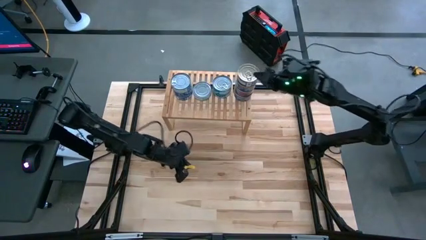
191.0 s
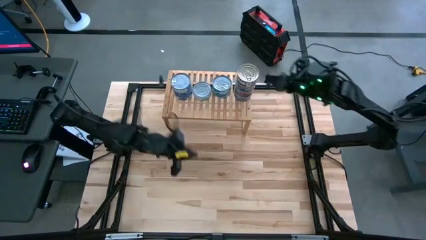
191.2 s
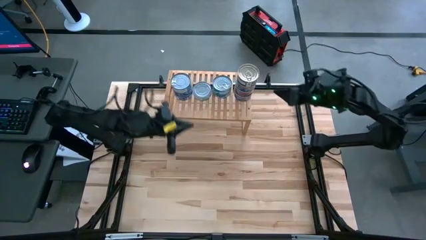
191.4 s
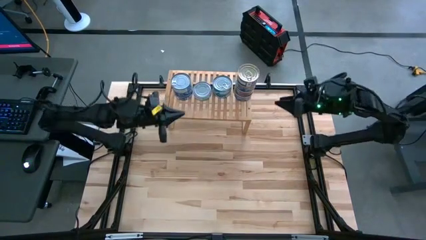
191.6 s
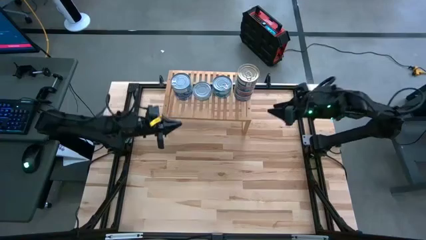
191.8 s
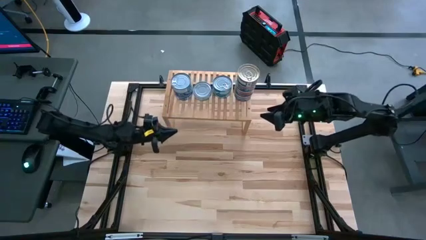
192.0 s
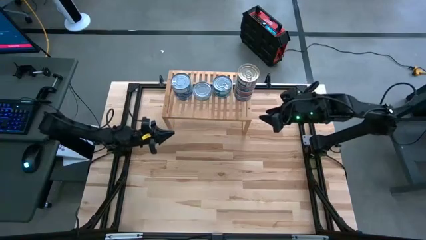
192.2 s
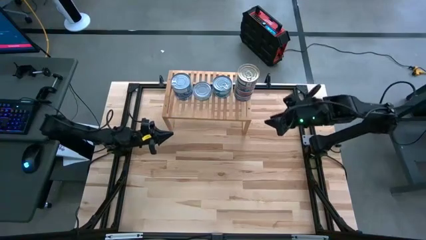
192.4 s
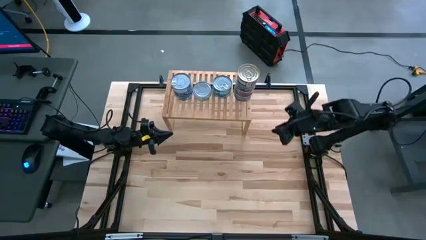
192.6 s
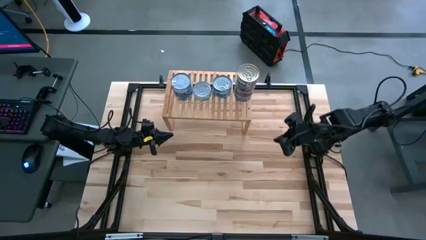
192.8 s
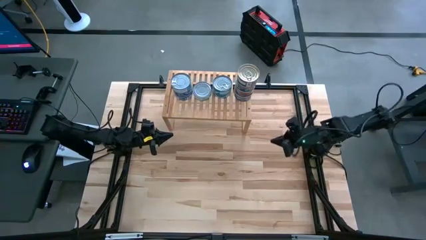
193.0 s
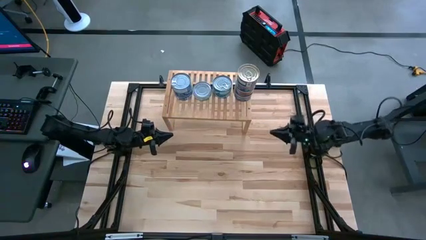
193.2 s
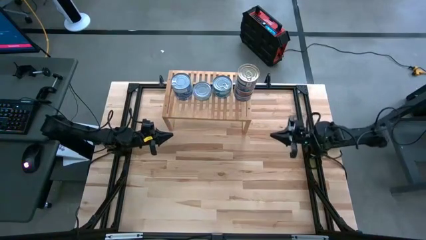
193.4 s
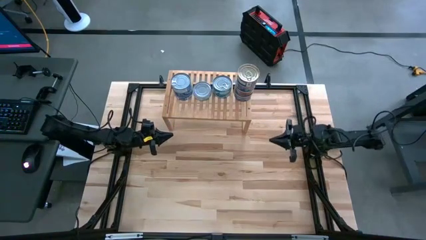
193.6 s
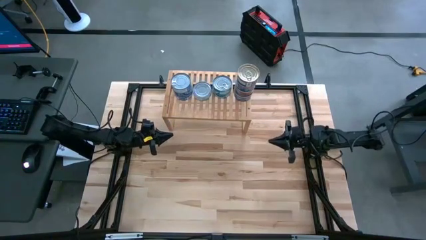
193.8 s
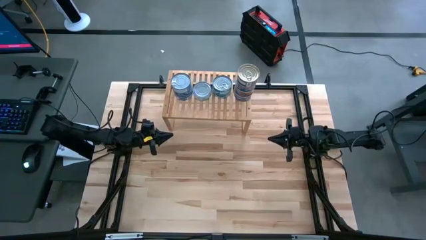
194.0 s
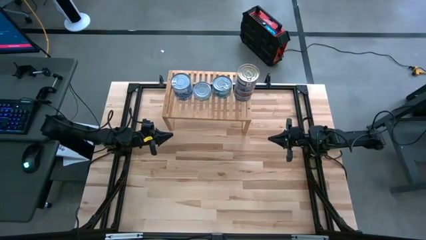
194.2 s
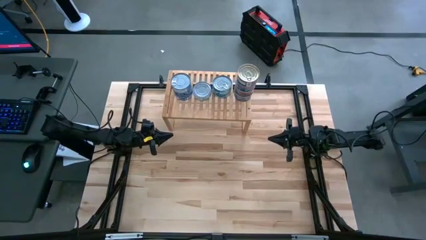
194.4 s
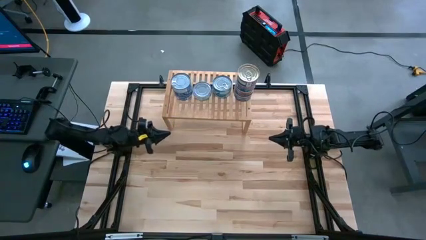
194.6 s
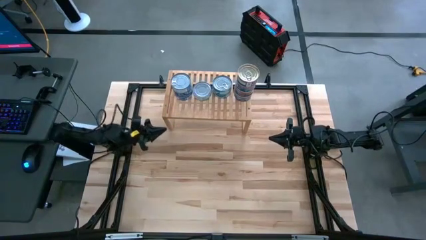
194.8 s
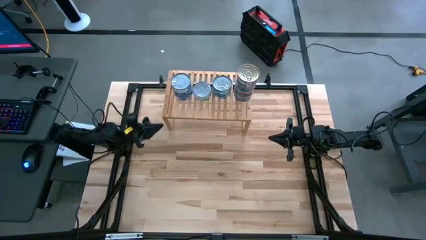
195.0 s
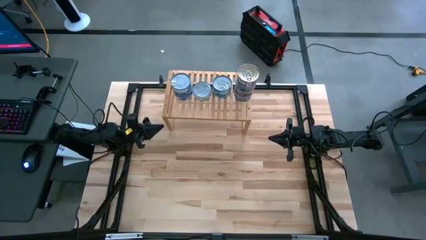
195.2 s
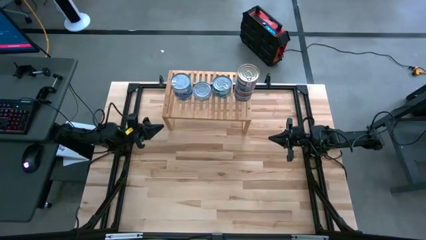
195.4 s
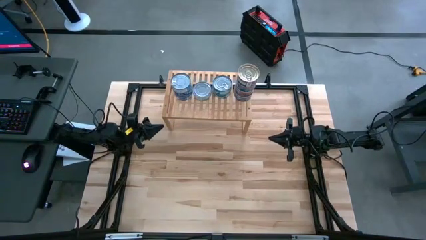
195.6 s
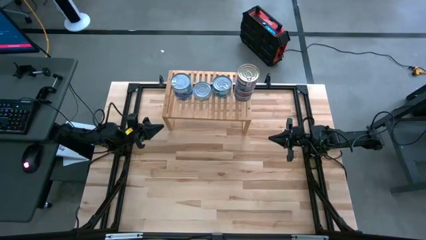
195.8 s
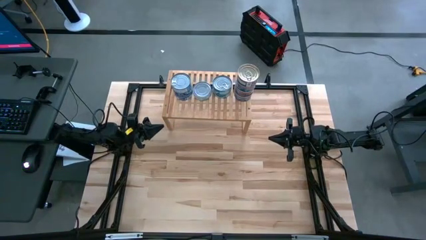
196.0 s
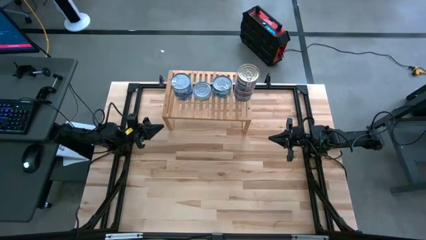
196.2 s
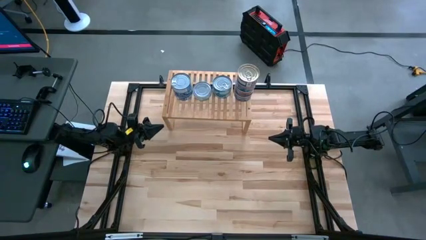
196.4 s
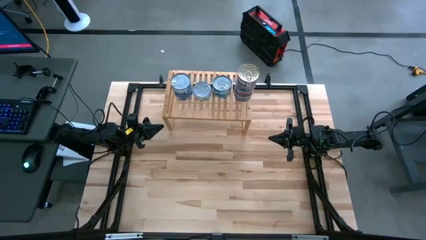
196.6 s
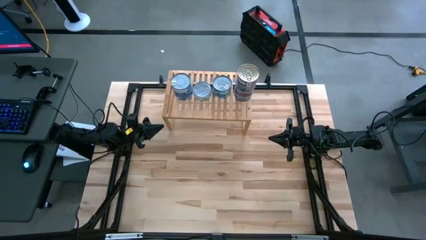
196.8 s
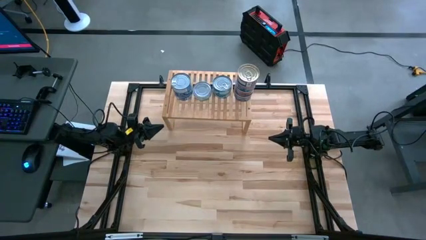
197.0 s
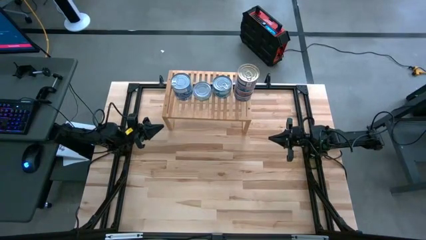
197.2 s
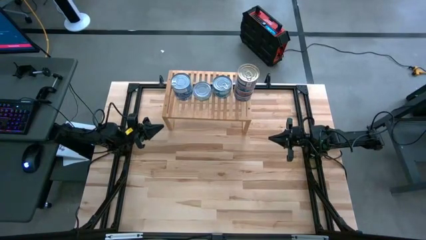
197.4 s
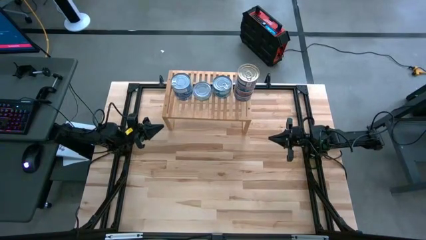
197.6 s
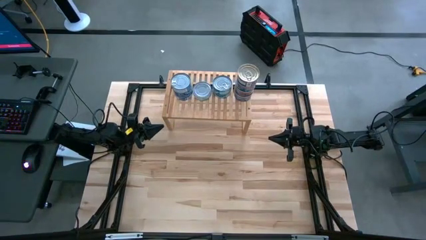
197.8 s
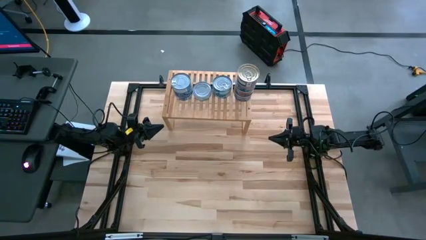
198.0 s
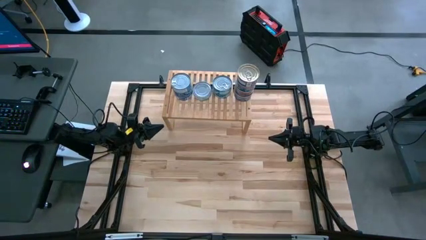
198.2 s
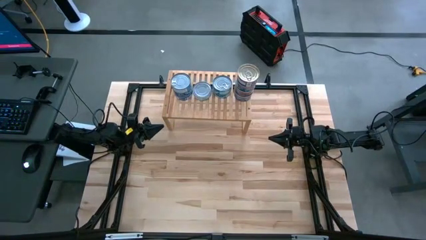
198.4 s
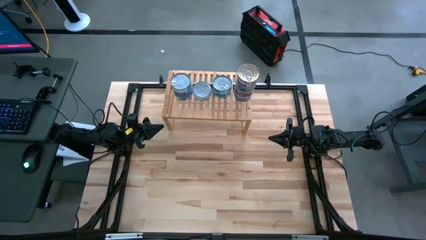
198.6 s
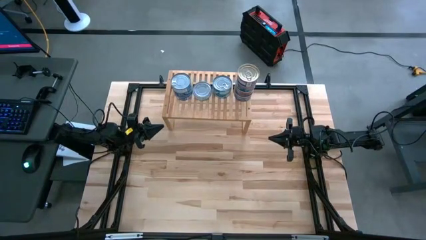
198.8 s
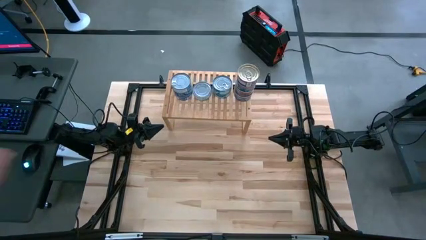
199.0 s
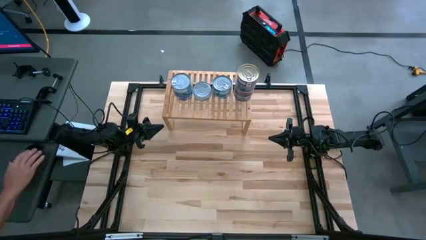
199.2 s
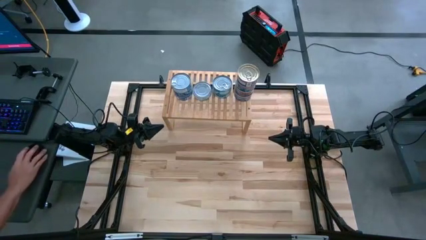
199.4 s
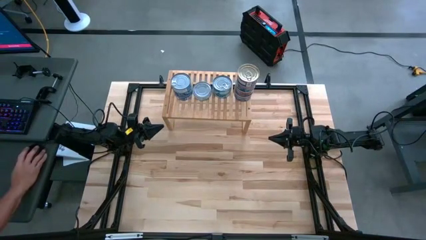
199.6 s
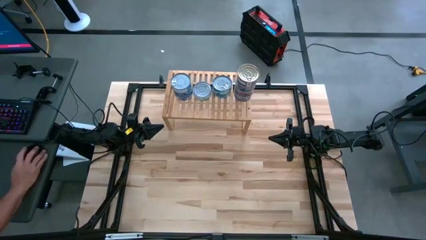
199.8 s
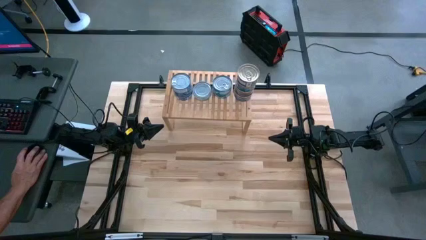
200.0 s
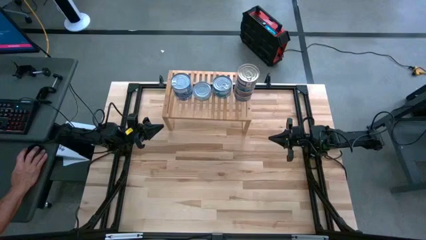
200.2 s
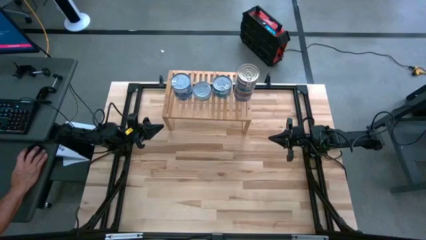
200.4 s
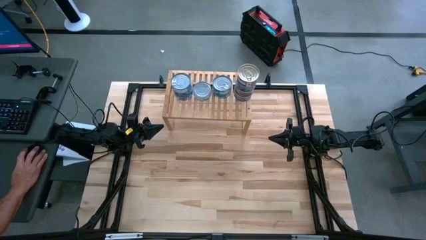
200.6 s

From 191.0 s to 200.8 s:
Task: Stack canned seafood by type on shelf
Return to Home Position

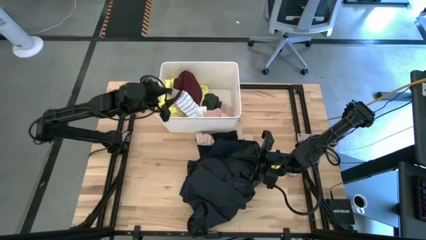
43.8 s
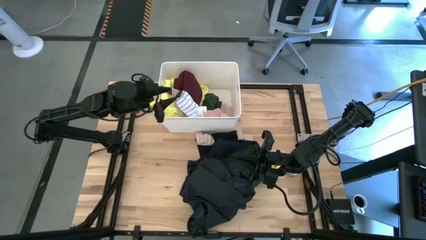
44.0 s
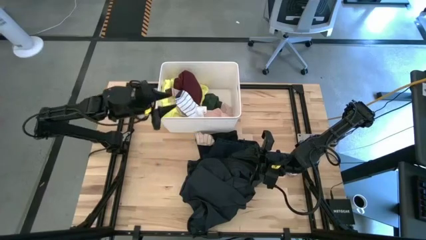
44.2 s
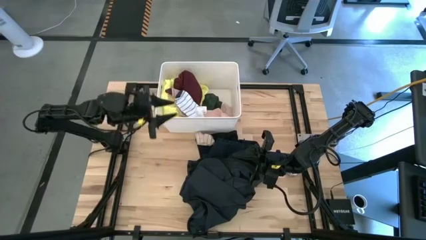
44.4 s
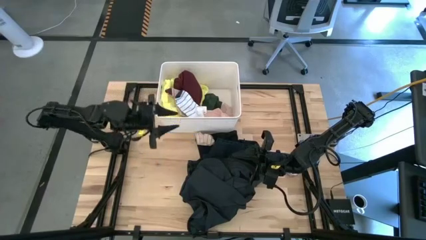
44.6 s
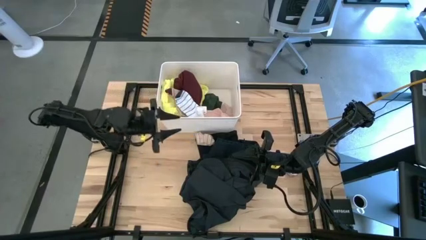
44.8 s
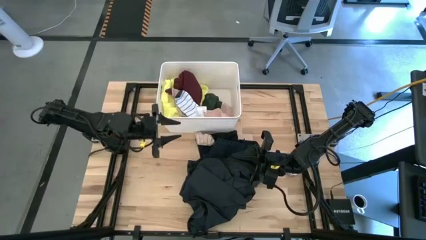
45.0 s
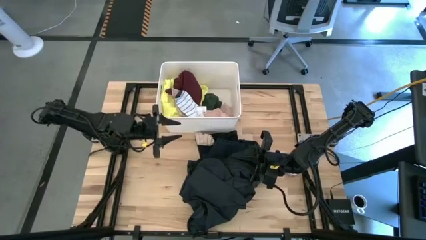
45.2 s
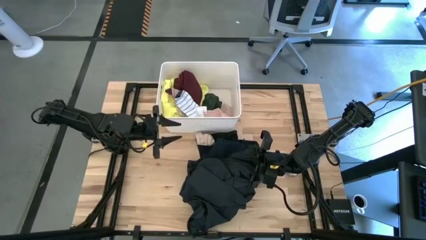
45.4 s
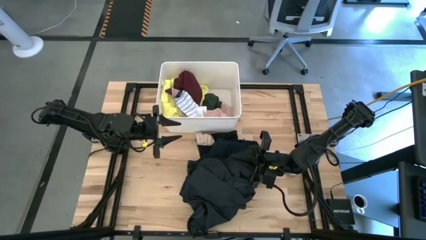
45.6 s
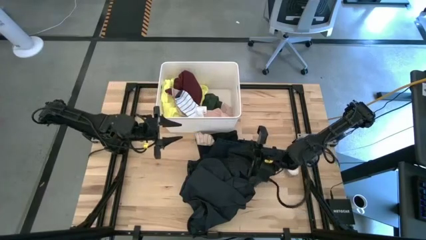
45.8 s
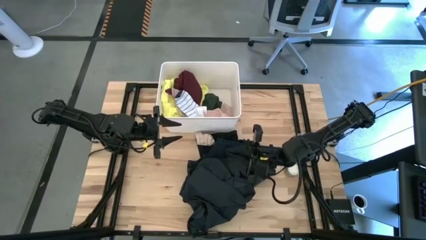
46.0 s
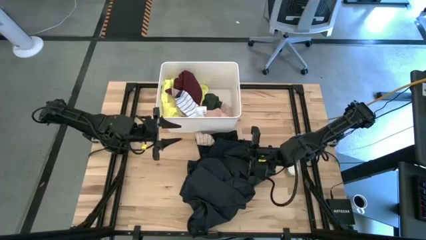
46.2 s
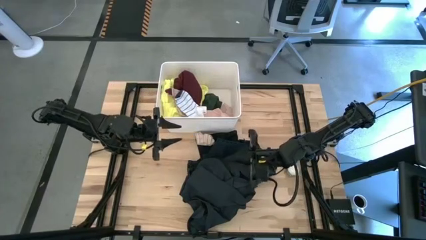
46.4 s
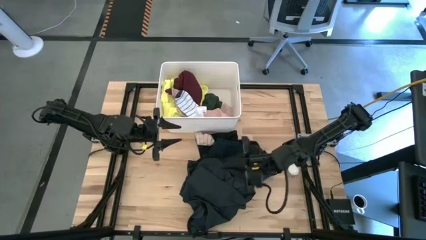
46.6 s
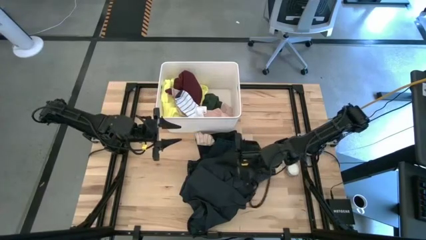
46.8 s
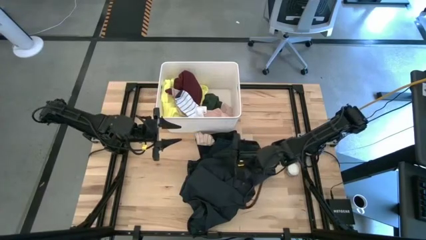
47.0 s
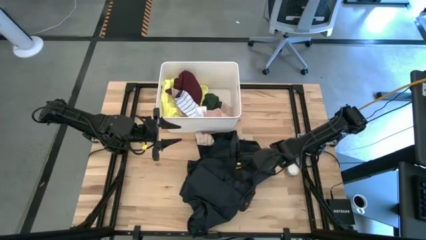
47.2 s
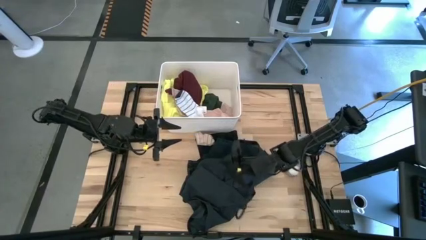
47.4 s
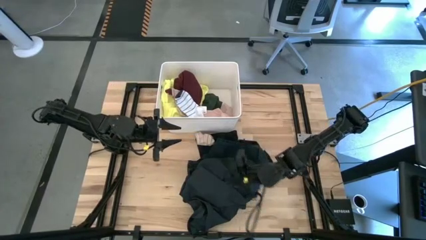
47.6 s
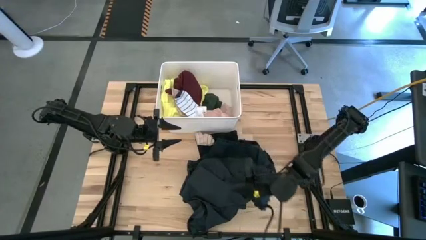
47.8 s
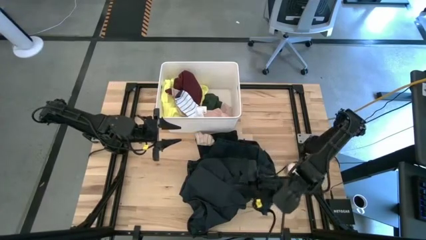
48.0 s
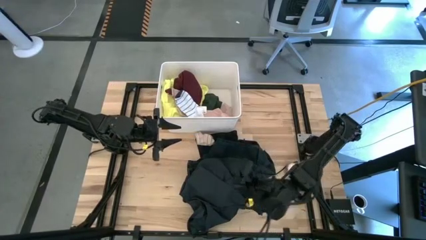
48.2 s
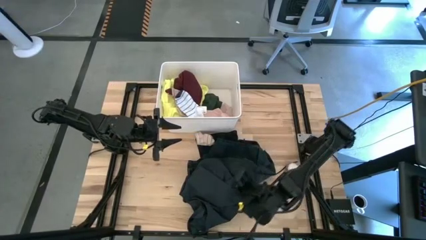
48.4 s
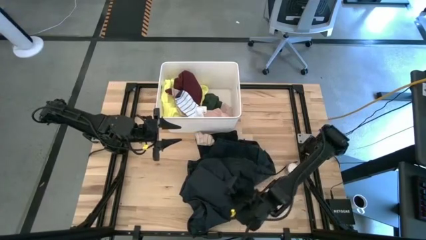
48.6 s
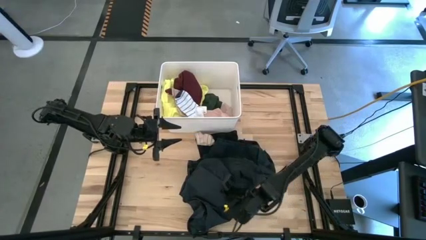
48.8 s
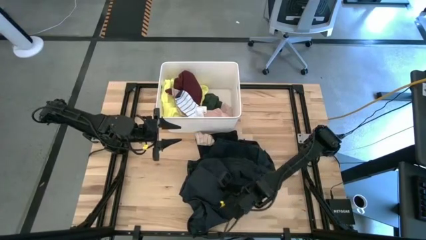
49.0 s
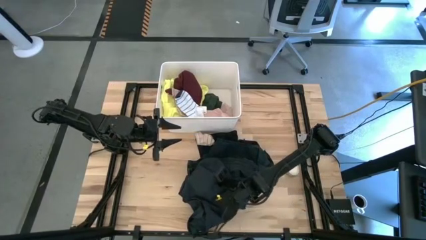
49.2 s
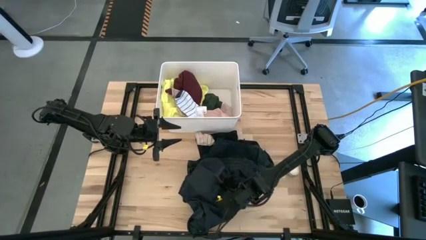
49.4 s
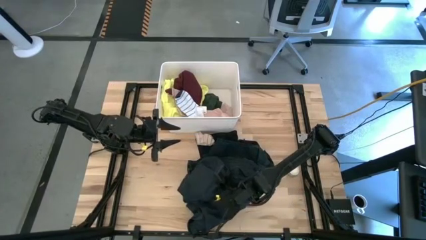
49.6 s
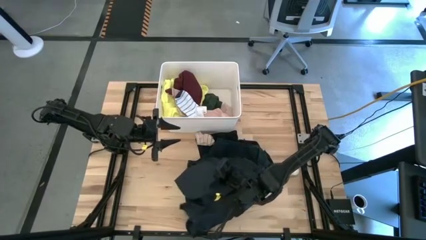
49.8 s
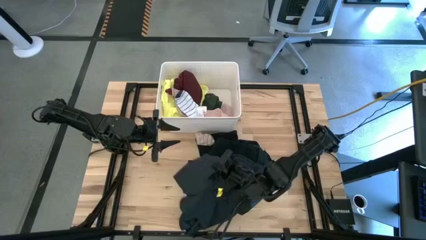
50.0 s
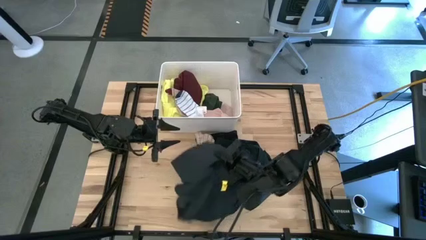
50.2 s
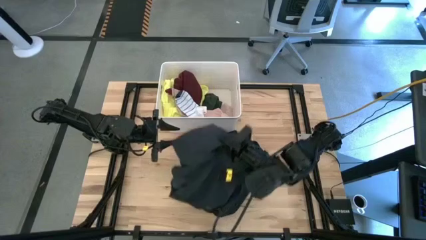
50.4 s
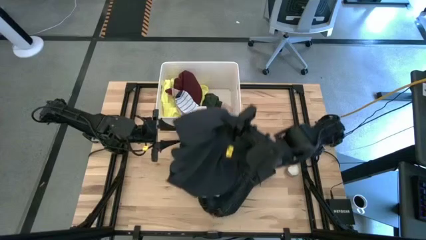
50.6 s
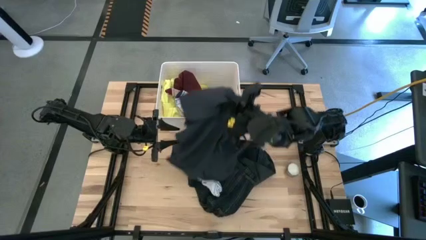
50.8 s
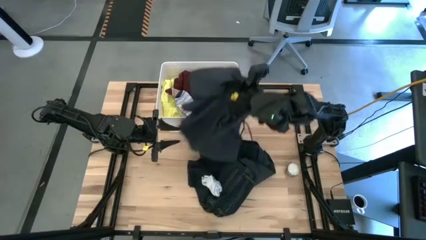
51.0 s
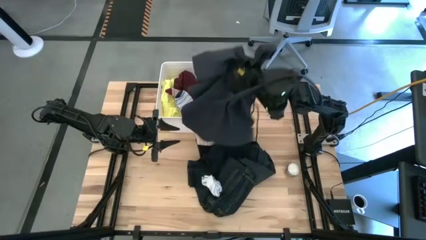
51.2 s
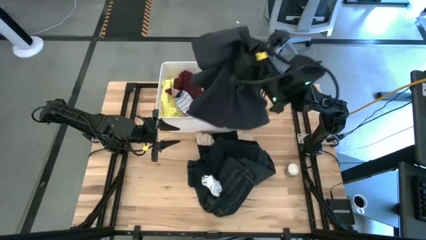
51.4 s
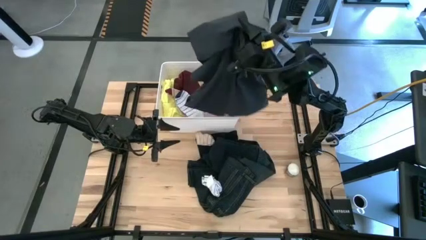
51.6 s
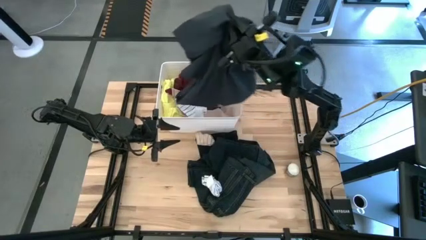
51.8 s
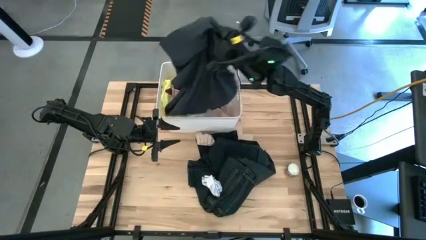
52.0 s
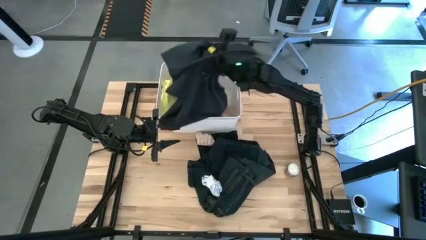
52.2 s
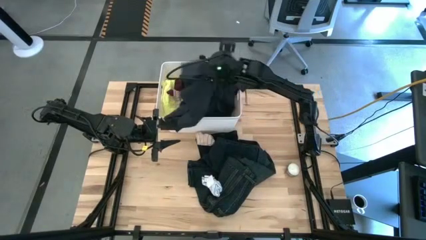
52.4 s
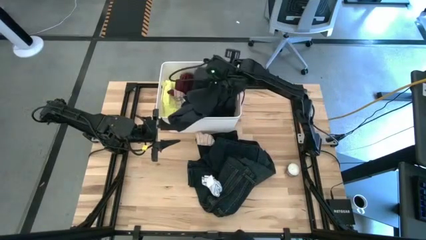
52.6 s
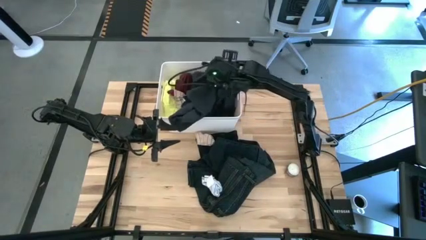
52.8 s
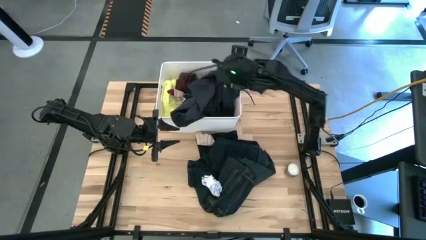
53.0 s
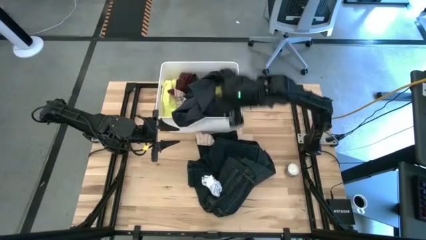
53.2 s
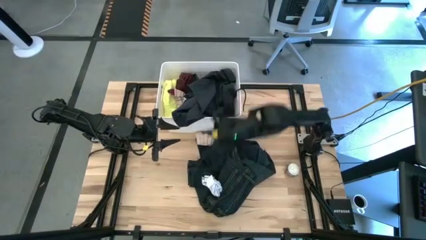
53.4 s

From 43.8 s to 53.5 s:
Task: Sort clothes
Put the black shorts into the white laundry organizer
